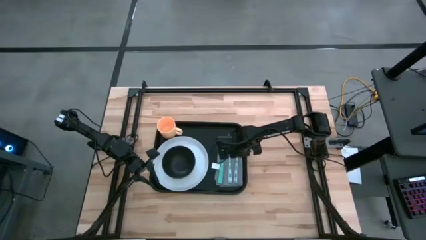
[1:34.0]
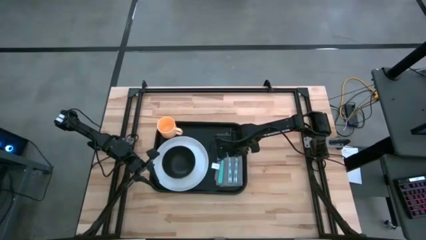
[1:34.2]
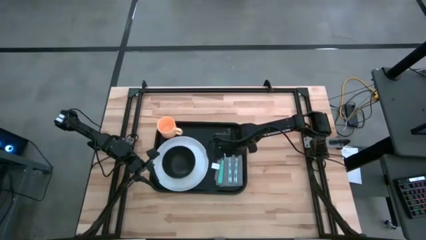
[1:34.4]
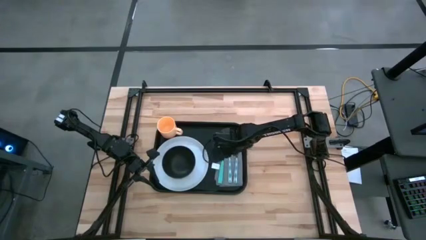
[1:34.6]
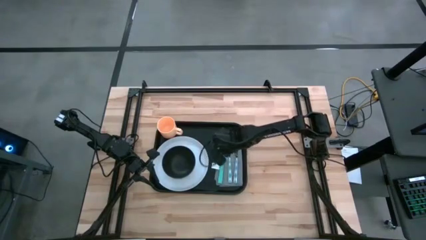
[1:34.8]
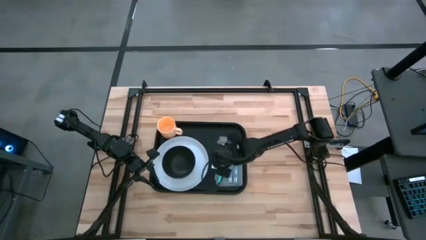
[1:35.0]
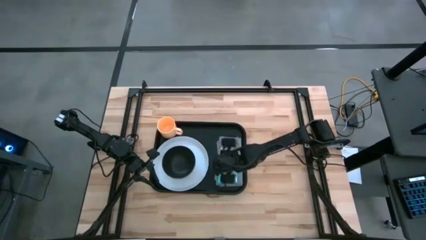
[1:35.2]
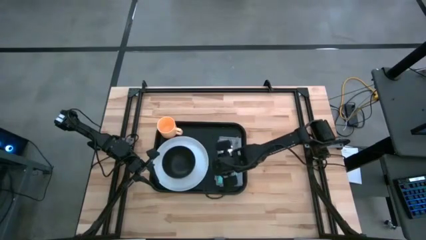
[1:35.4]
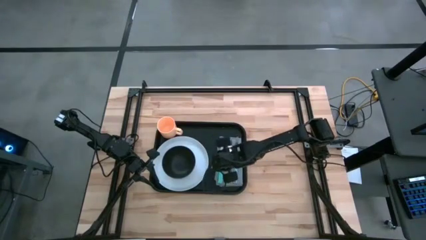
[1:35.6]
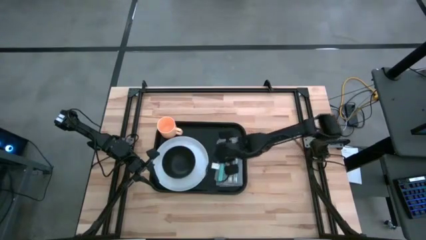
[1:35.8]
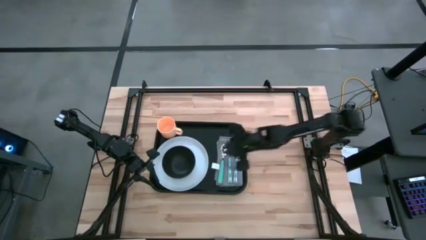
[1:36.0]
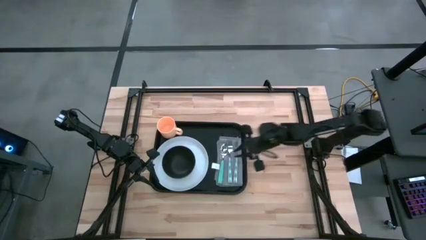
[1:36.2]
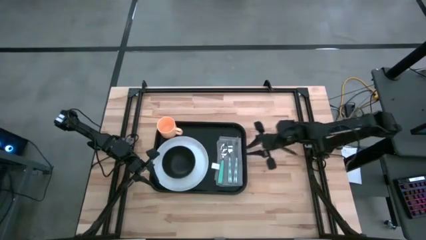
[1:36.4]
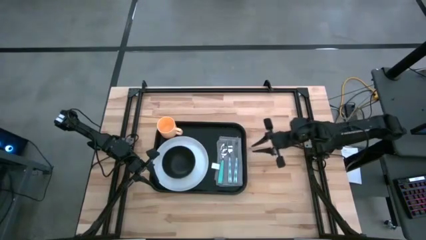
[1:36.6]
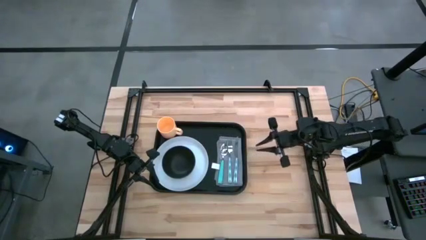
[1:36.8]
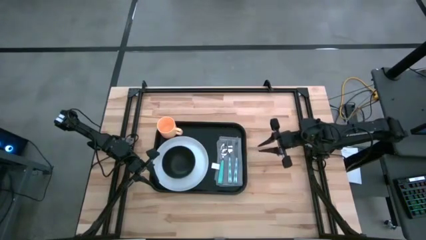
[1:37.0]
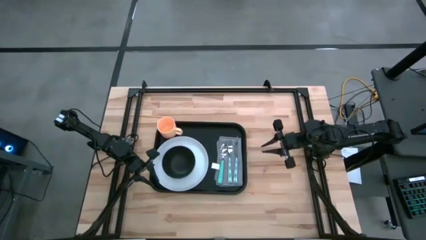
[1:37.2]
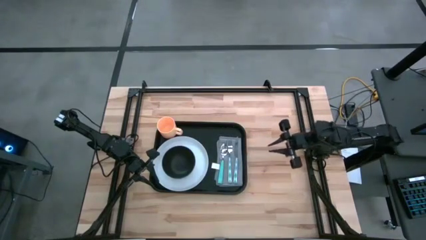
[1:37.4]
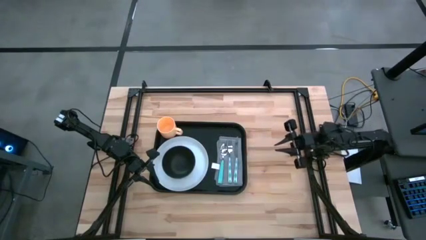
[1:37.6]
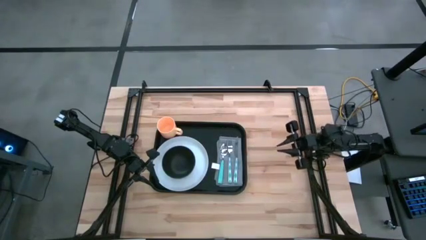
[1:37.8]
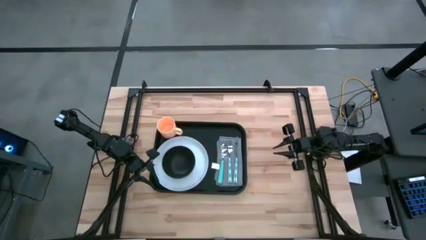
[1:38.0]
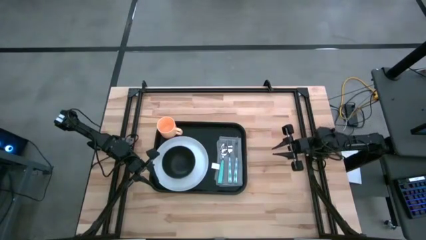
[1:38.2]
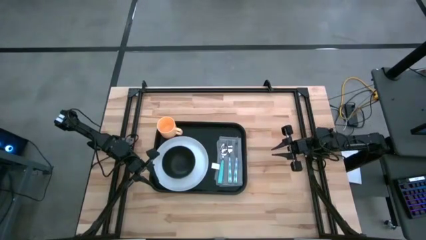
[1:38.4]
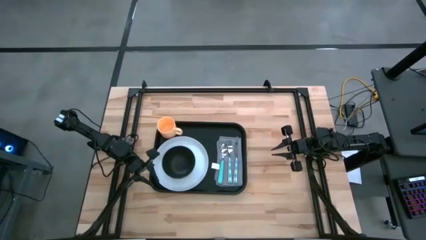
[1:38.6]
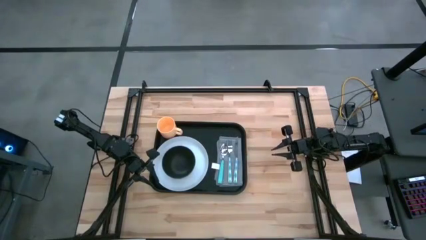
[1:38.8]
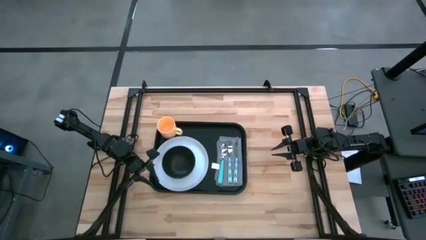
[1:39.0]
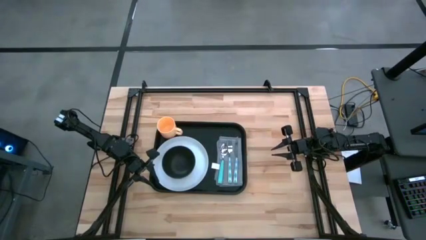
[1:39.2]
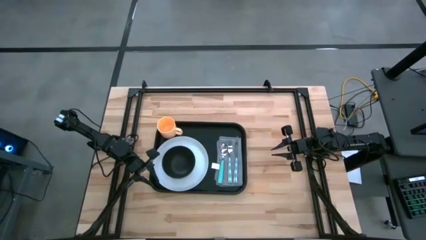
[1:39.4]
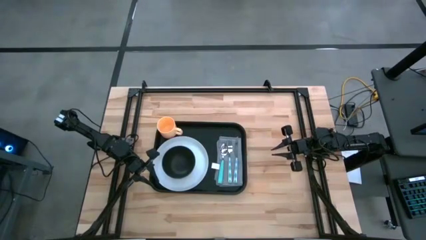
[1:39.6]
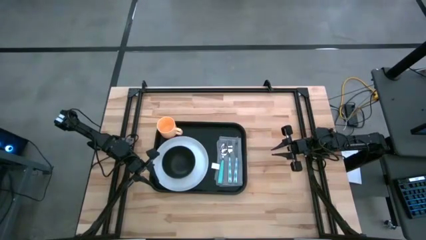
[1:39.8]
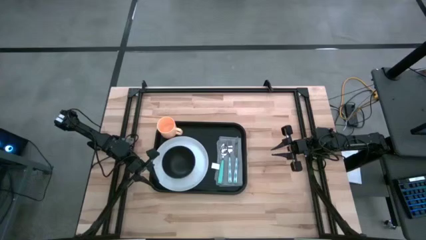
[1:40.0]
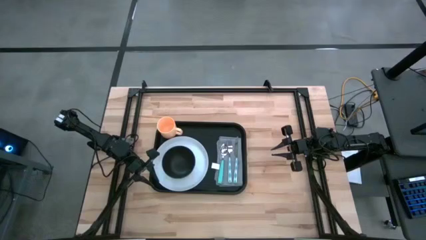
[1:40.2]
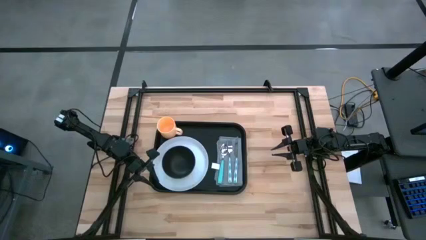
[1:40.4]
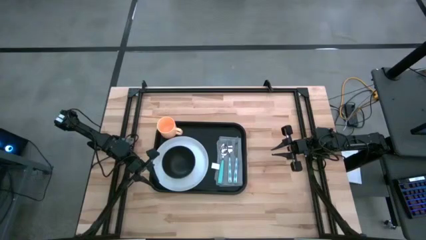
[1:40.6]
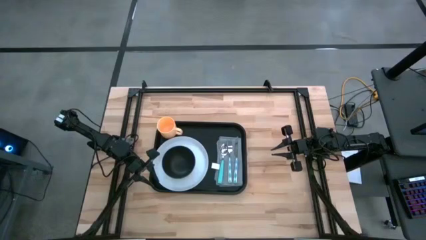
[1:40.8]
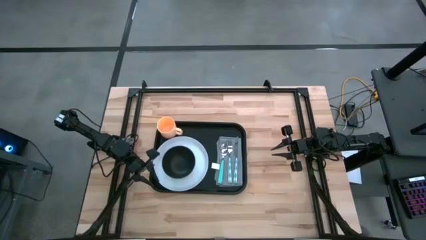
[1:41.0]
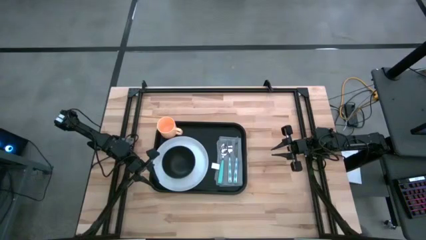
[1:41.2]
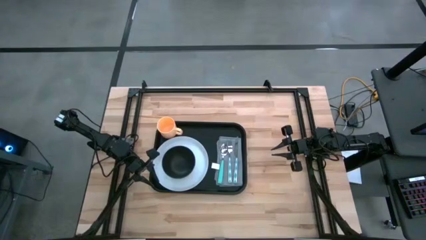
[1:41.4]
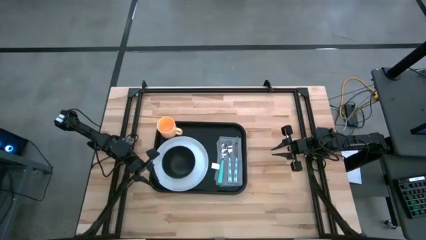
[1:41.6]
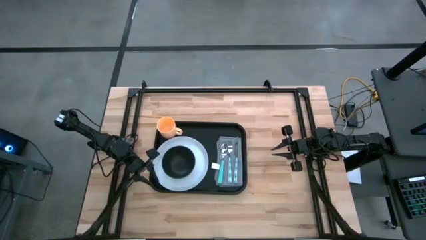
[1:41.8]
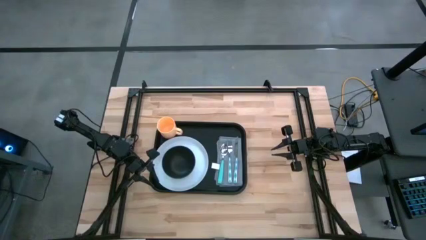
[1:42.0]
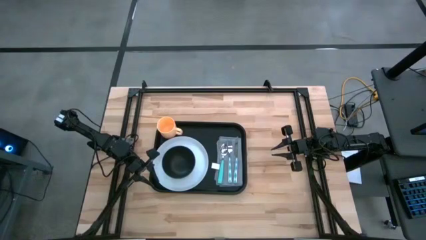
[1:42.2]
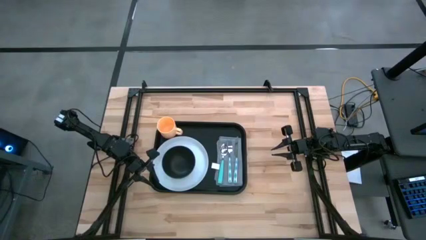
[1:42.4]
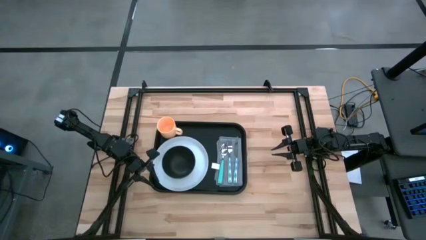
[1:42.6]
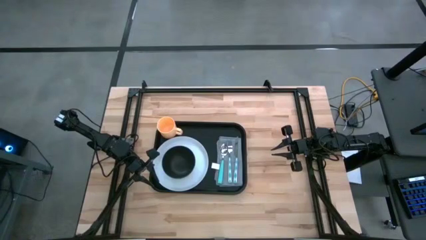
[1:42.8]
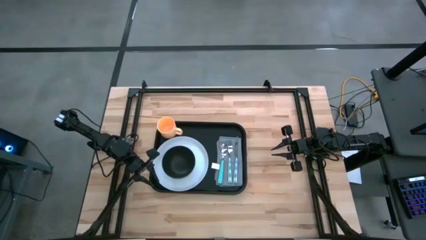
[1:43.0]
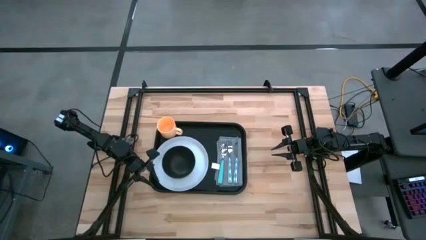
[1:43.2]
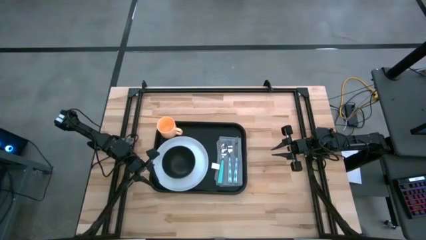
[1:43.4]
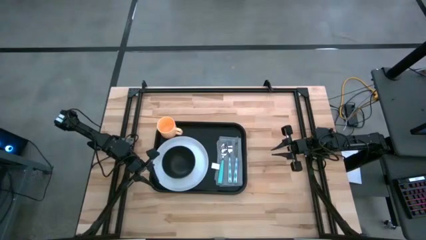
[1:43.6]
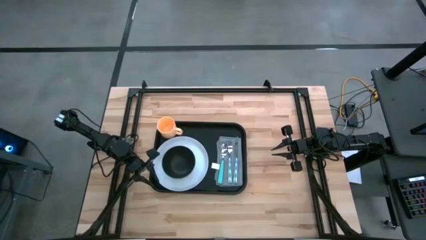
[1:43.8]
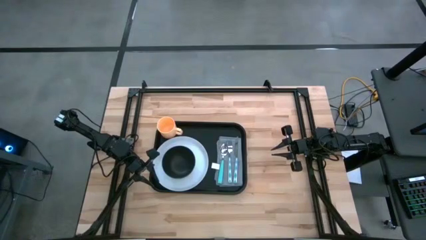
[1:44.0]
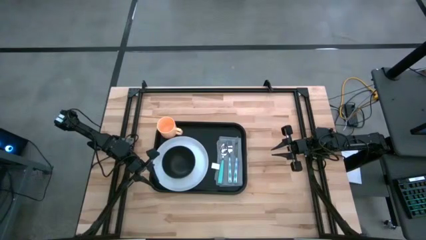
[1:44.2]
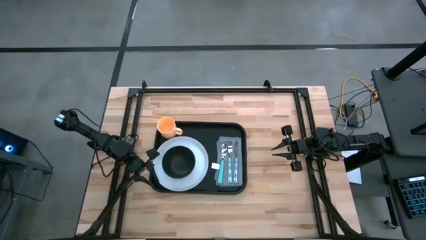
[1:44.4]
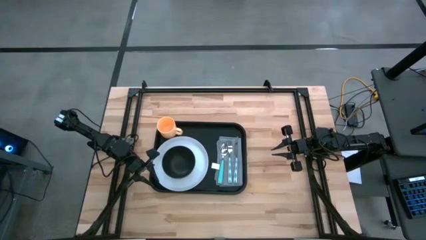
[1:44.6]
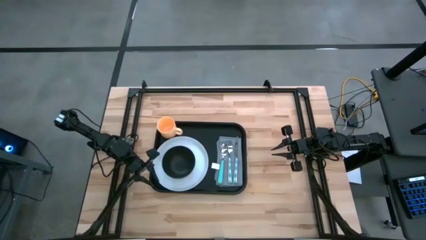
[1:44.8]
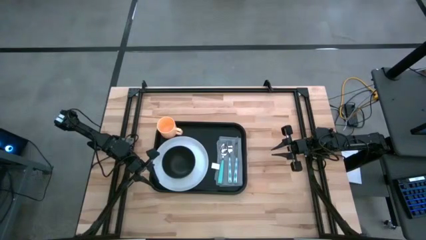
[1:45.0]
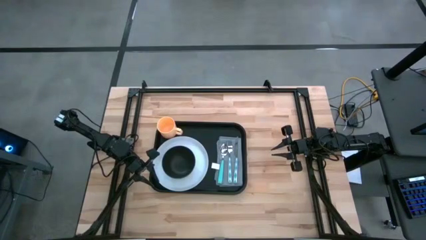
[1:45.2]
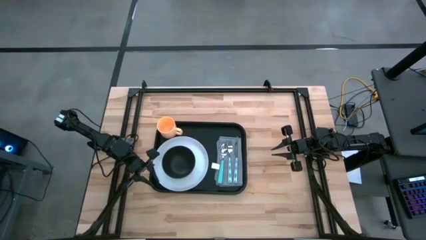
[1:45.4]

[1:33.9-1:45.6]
Task: Set up tray
Return to Home Position

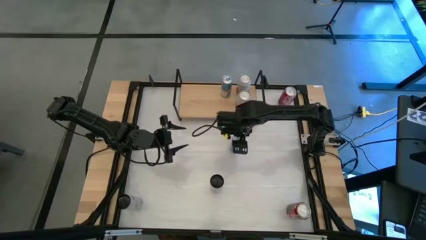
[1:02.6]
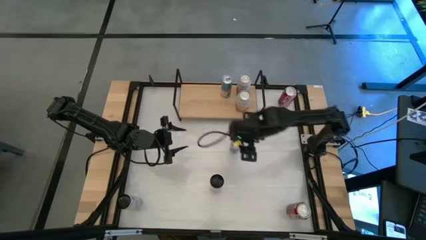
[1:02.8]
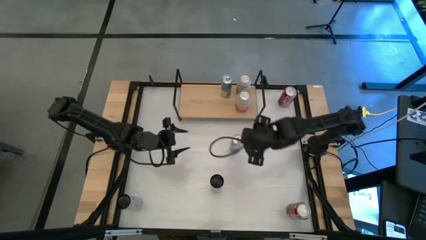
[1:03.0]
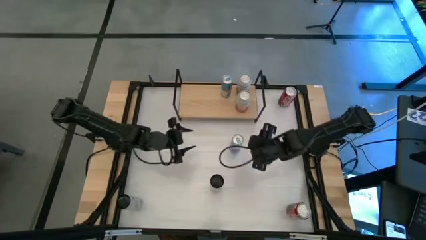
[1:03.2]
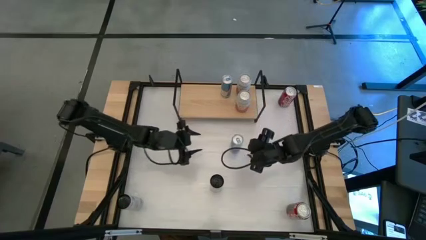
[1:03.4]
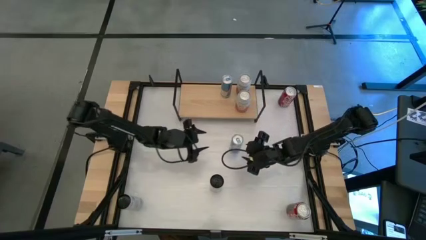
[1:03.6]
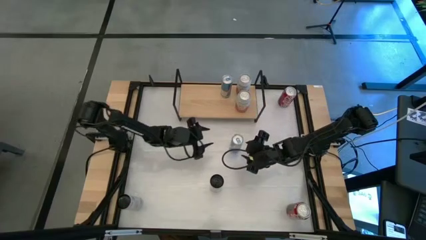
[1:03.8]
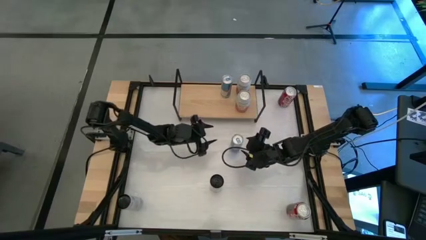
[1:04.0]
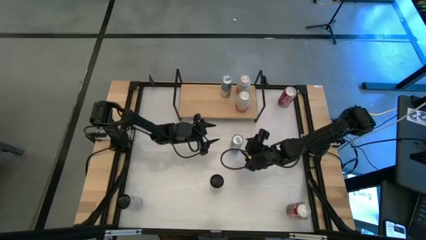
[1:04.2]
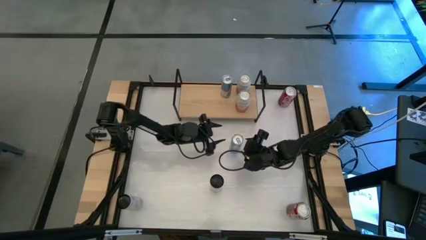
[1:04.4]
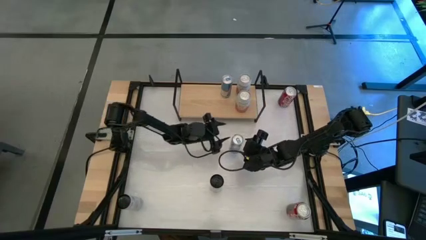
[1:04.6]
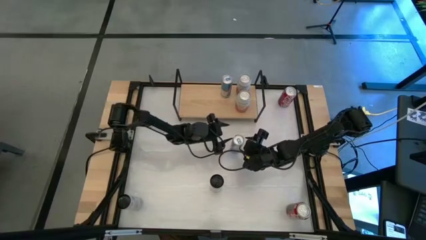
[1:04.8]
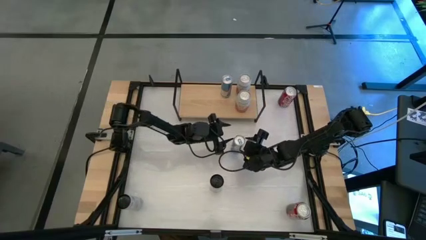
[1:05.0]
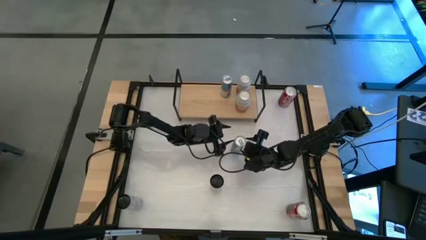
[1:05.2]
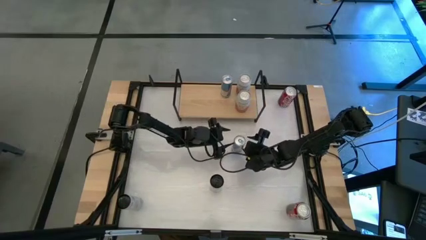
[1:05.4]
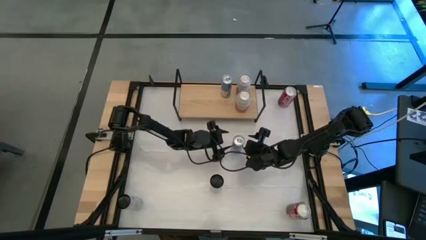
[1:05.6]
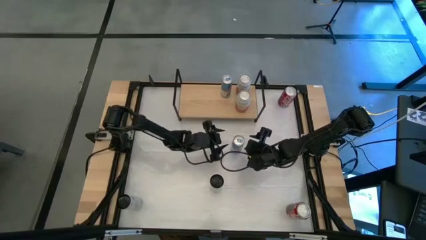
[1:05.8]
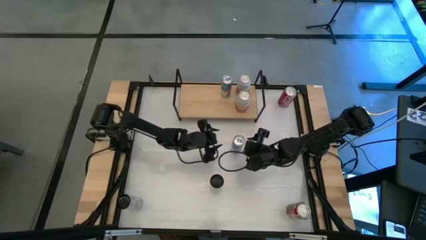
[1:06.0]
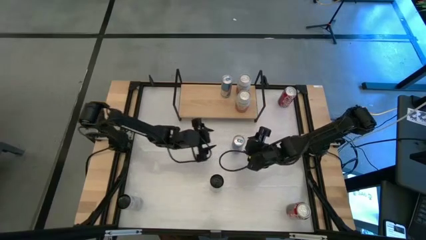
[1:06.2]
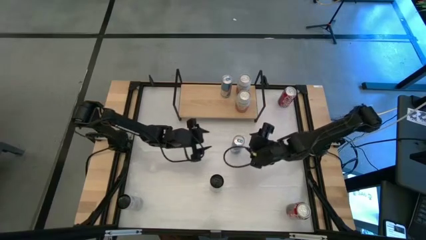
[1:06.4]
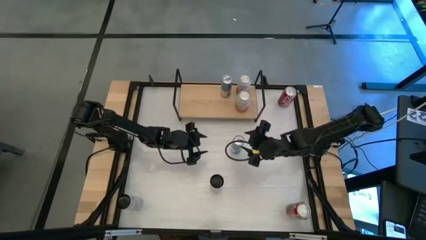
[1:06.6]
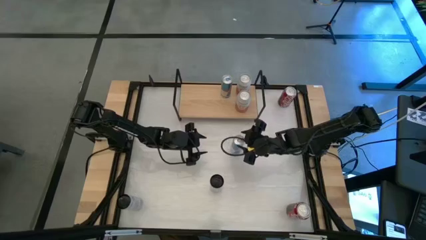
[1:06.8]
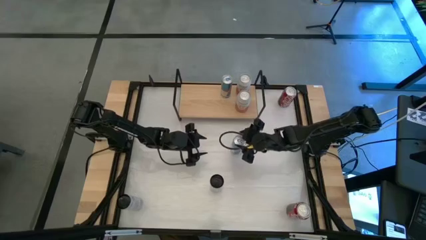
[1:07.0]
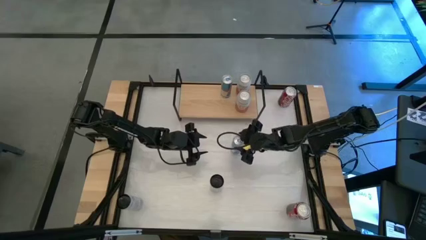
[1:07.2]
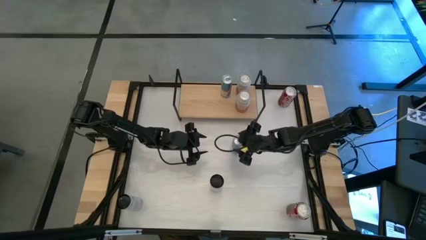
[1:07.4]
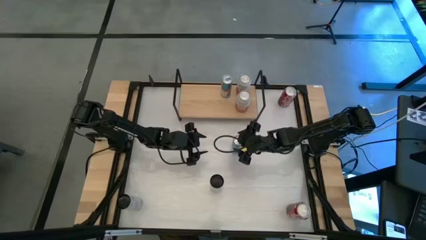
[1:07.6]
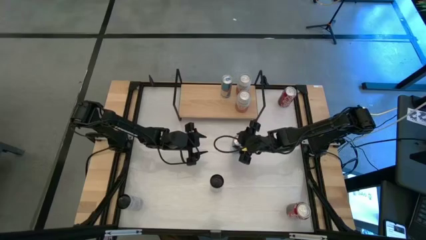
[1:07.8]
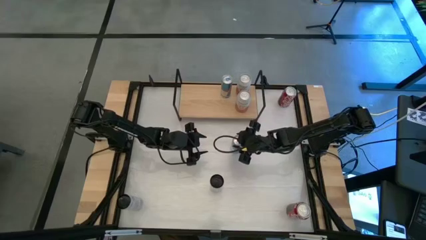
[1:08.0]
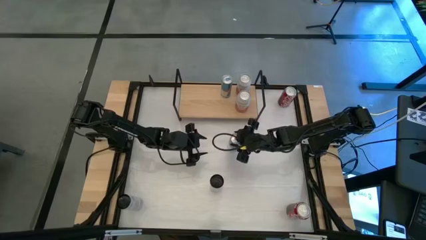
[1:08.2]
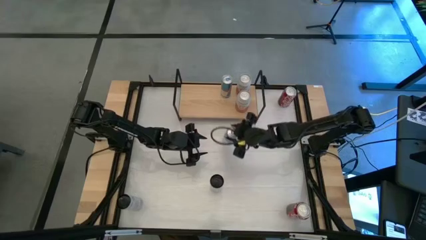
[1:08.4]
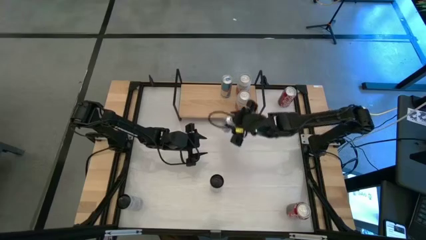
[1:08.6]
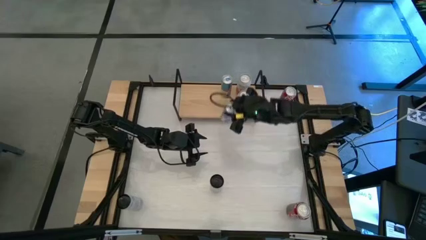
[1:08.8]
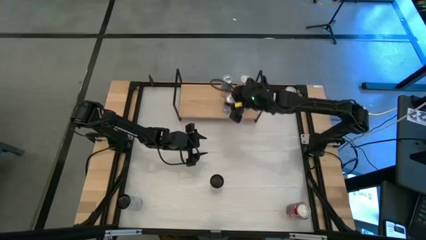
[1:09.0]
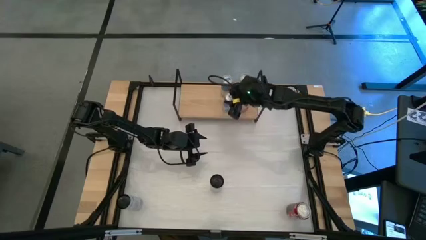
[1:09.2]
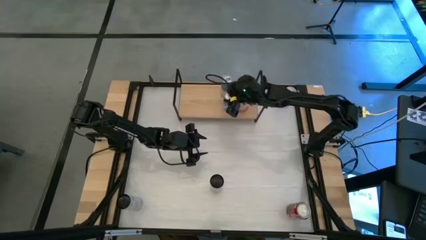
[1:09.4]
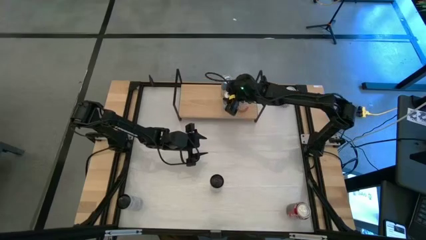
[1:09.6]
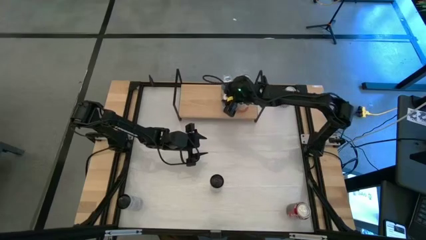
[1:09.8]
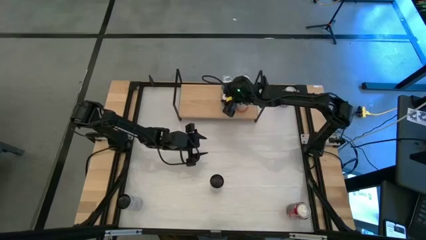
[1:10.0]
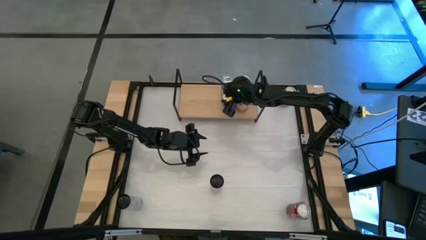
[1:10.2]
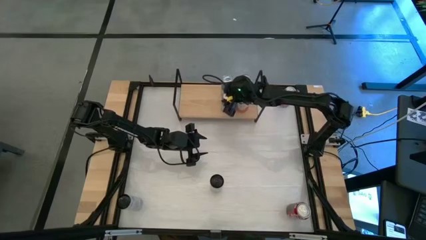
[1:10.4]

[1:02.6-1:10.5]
Task: Place canned beverage on shelf
Put the blue soda can on the shelf
